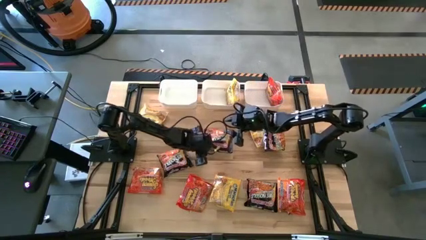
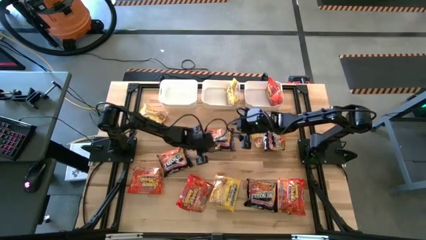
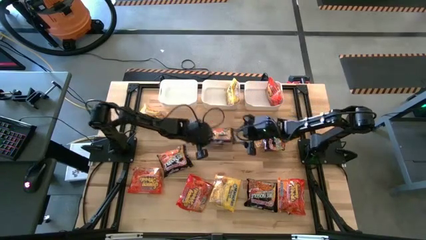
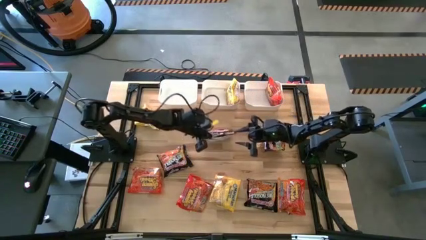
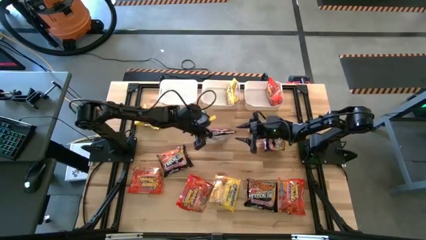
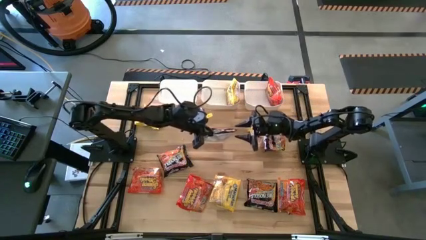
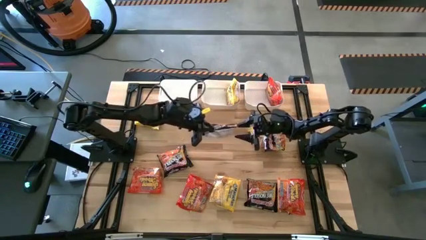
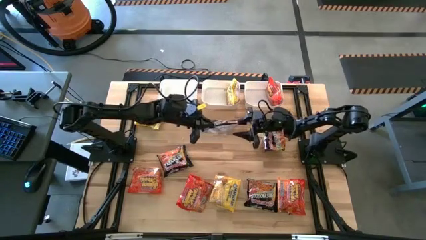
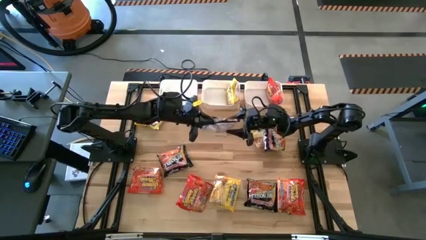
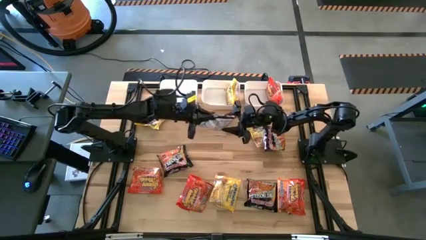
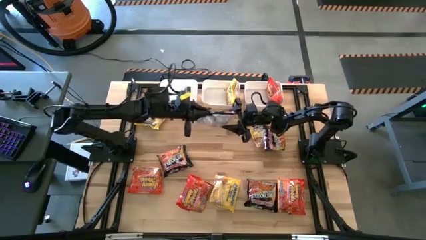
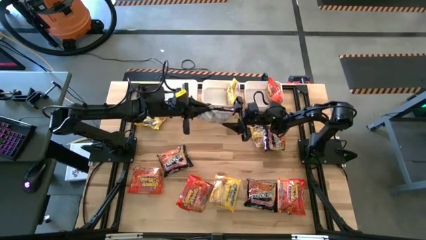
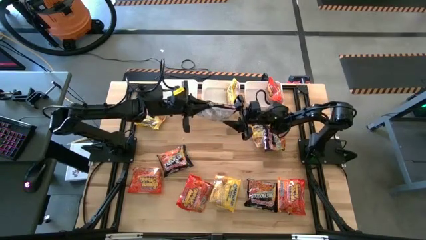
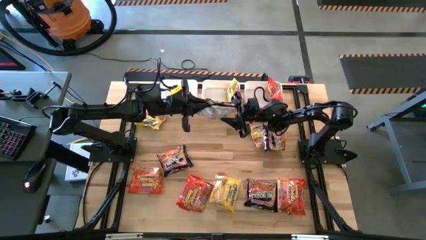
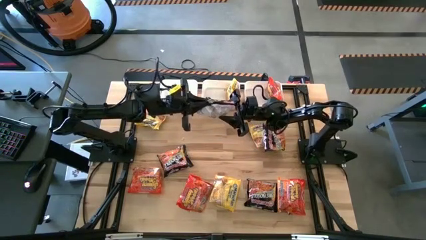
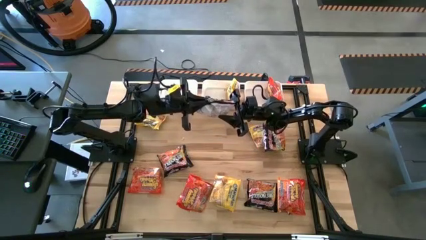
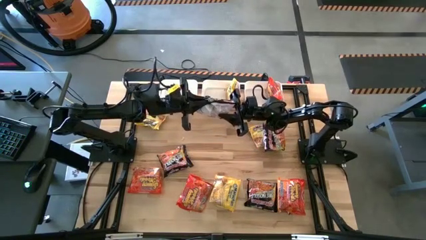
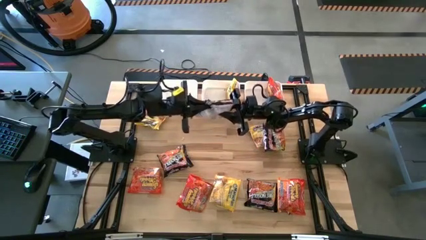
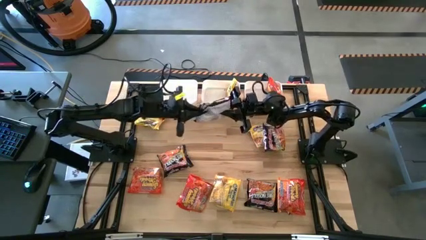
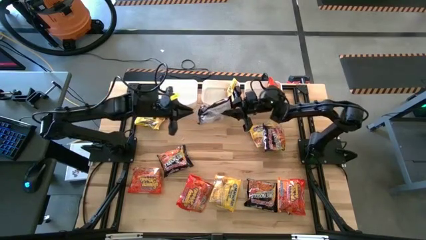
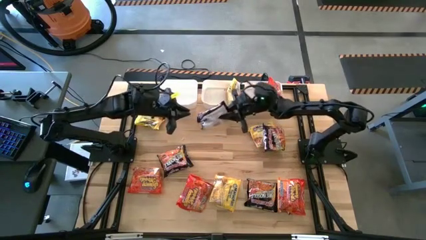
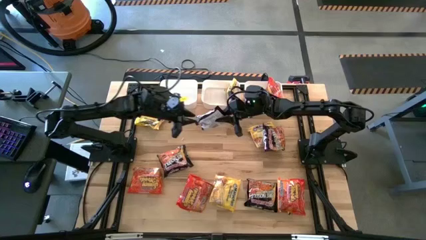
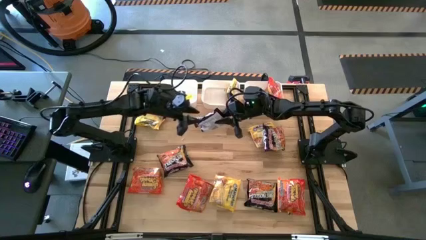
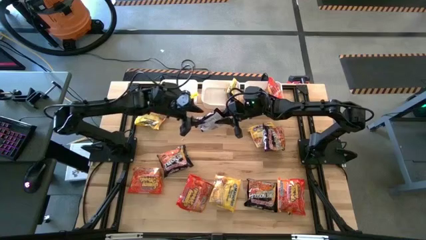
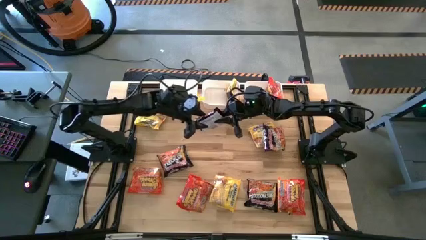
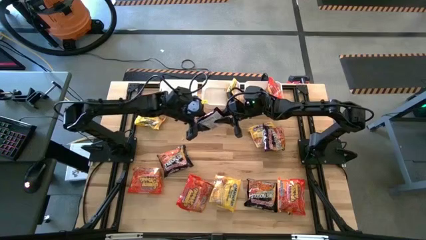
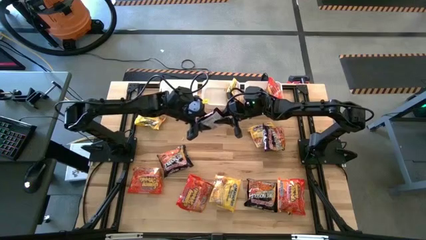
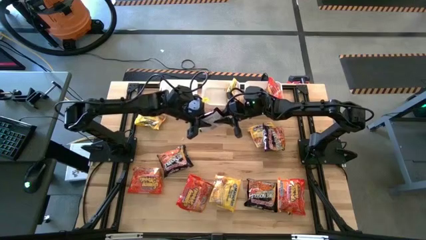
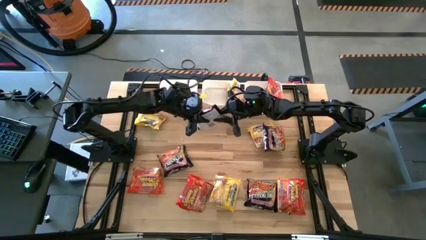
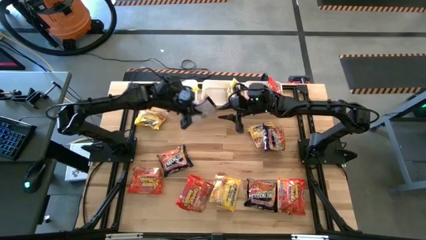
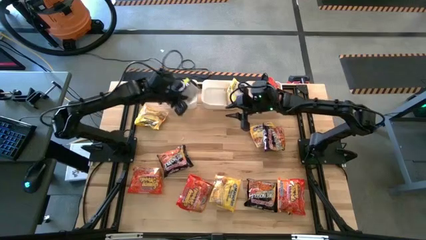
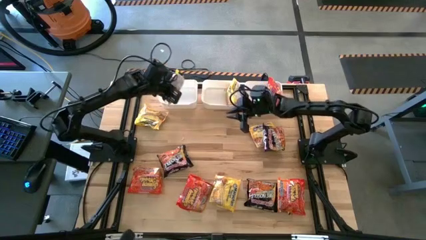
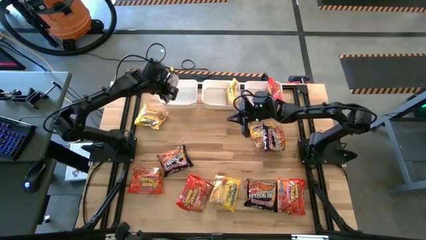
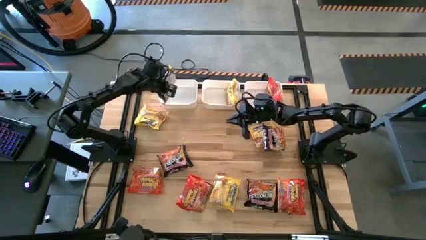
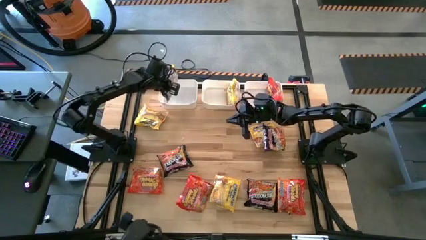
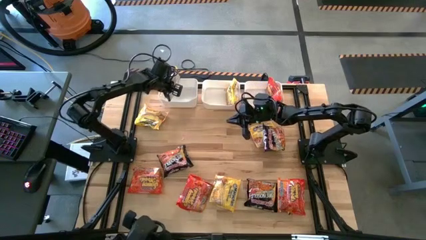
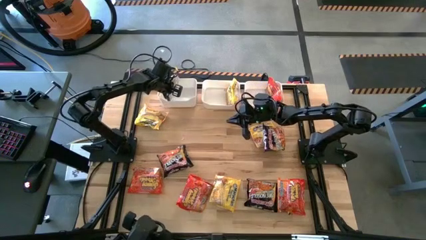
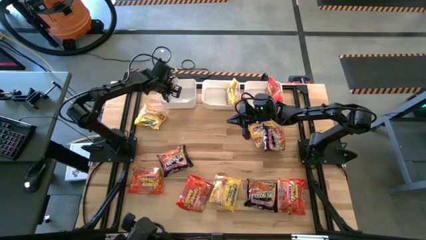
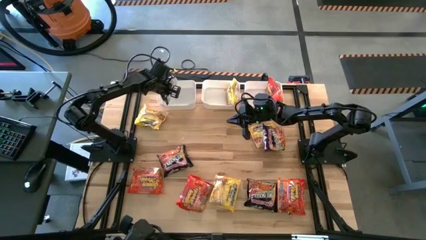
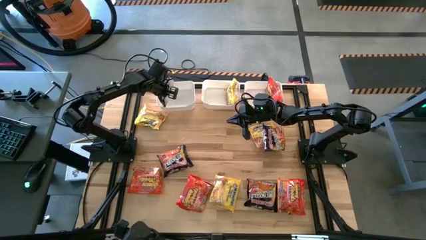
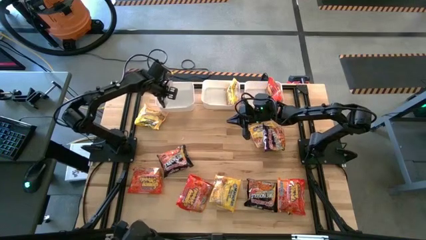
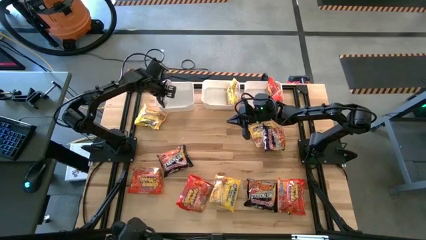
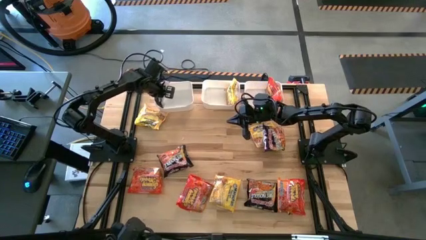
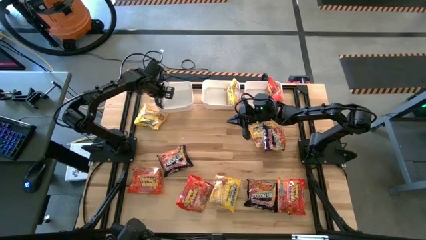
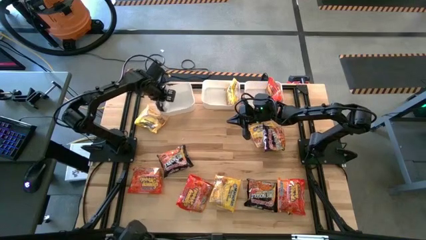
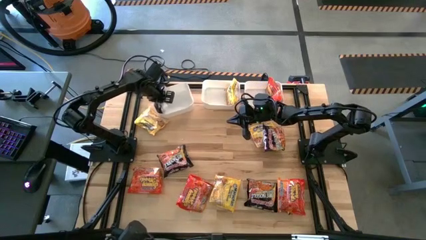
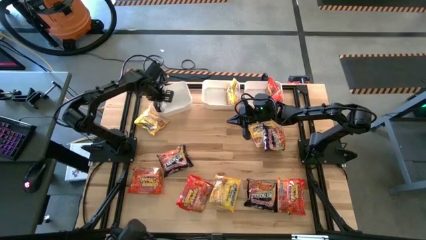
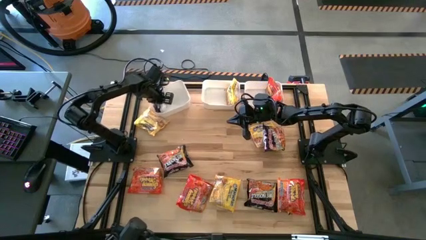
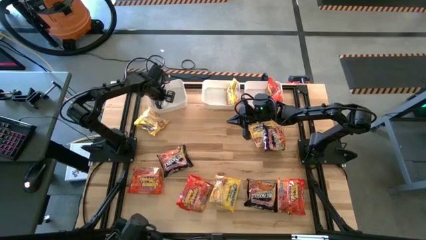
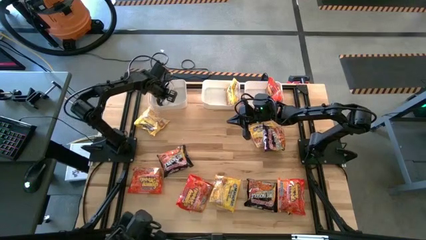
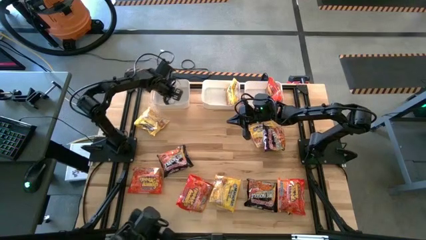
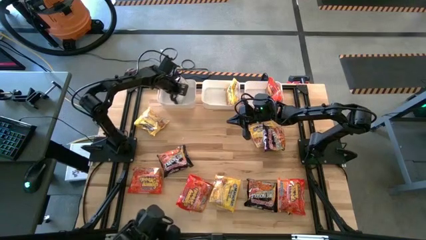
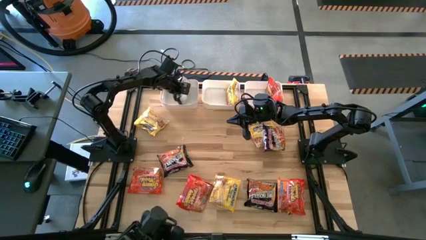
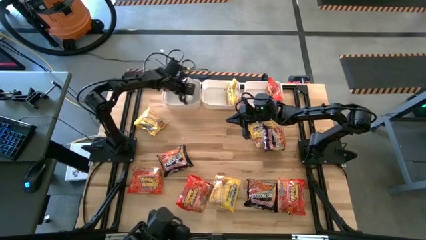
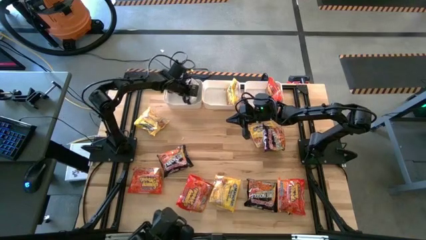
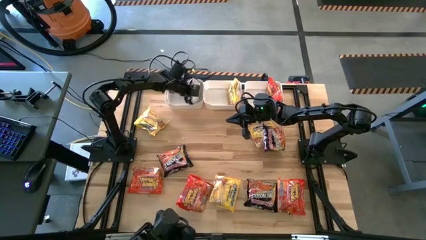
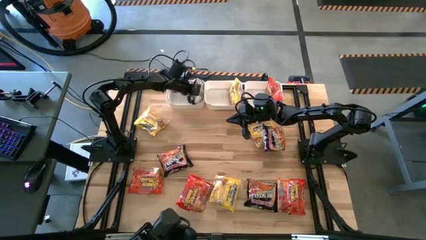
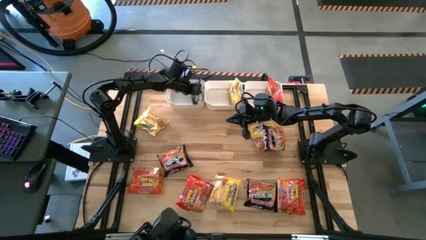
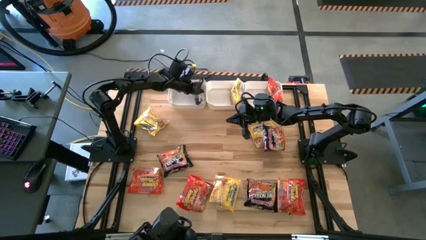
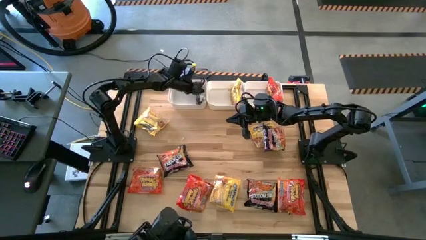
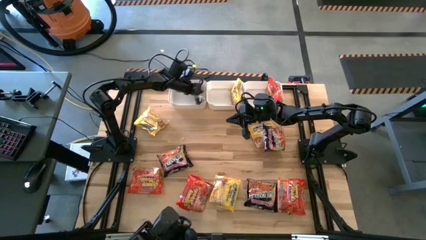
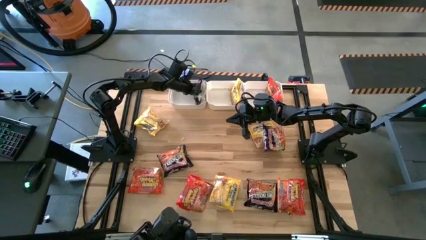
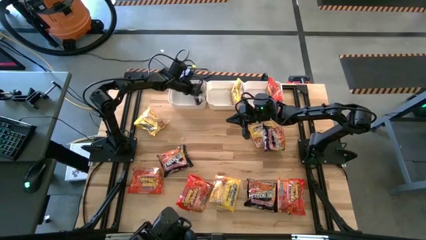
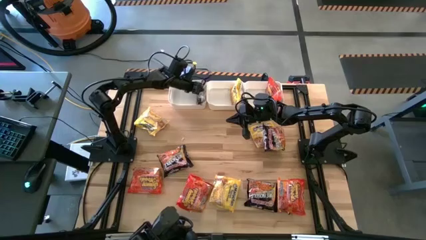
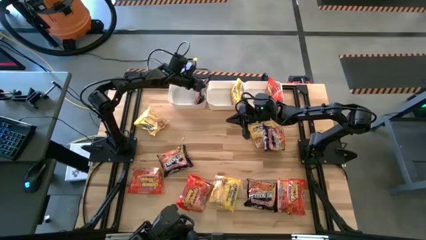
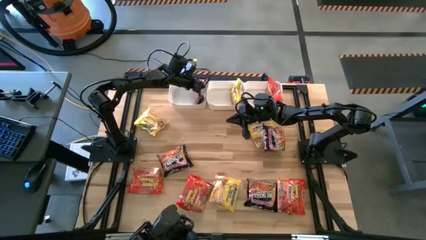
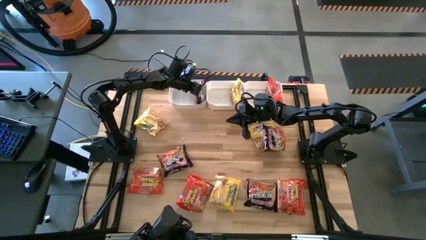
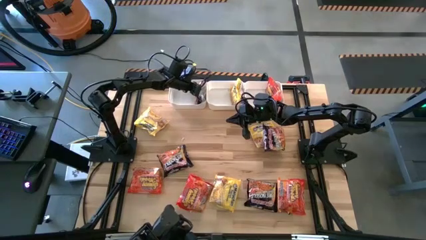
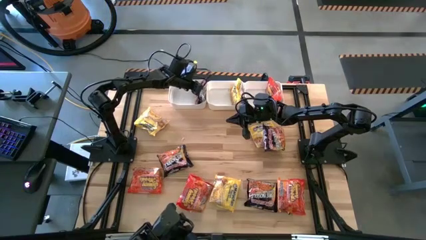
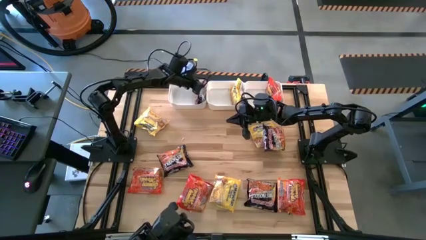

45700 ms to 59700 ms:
Task: Sort Maruchan noodles
Put the black noodle into the left white bin

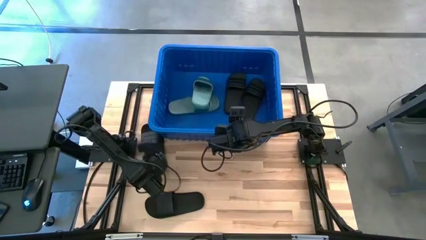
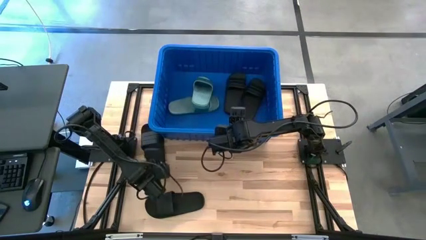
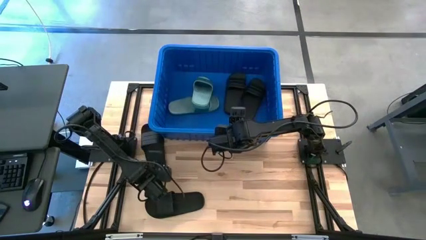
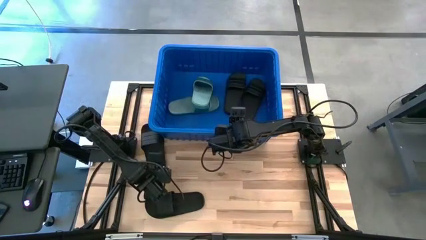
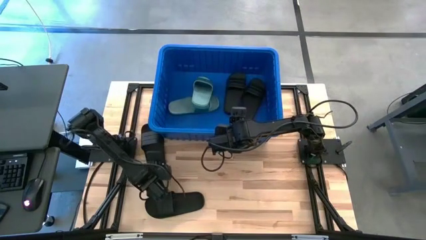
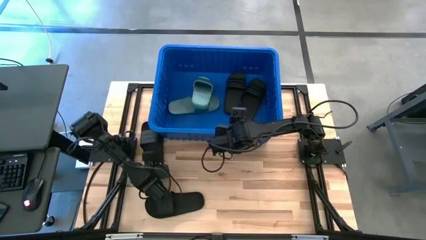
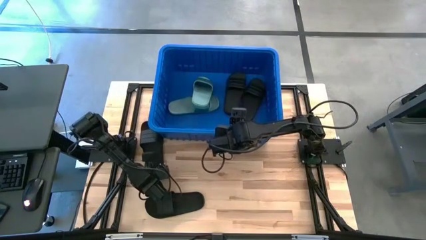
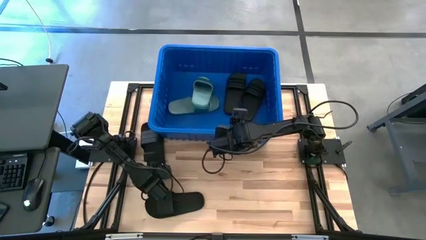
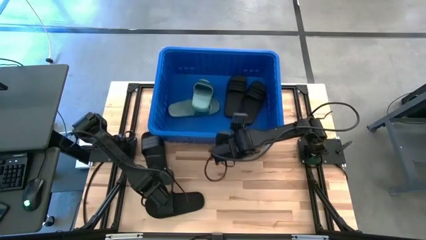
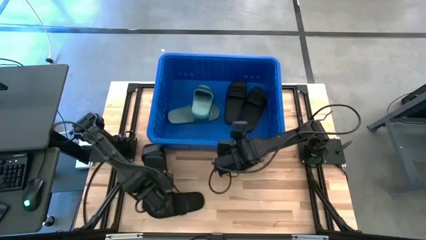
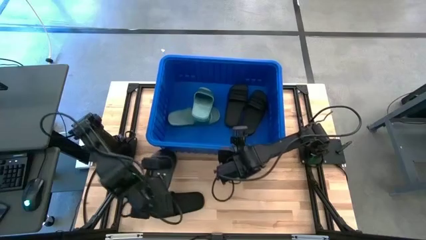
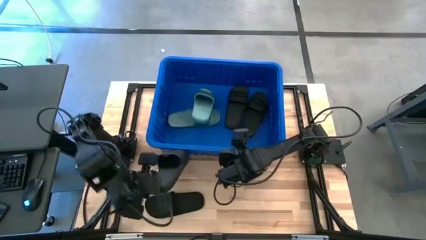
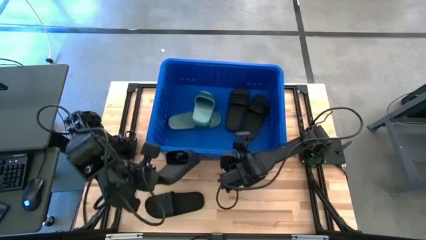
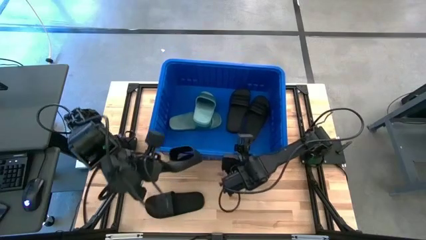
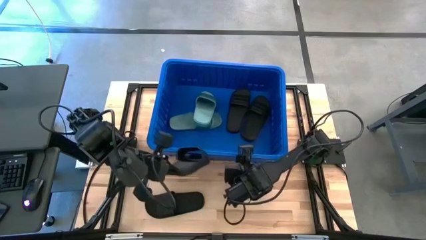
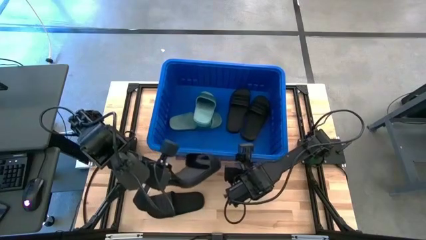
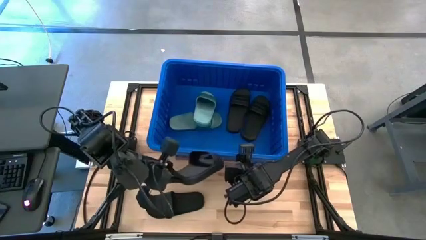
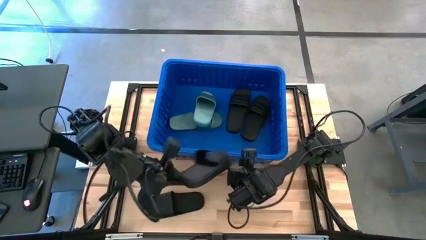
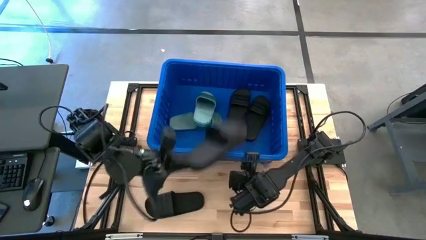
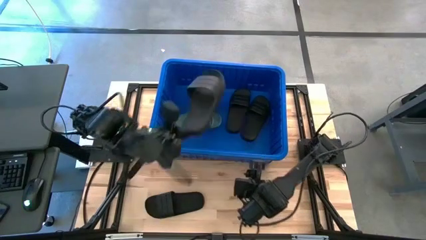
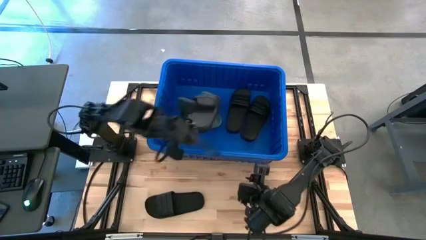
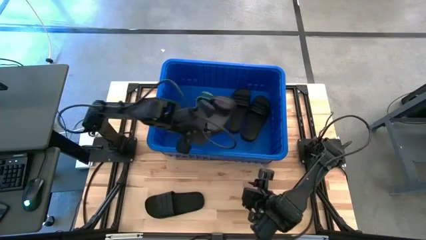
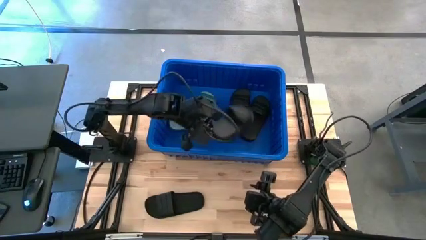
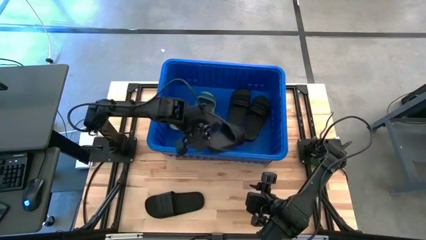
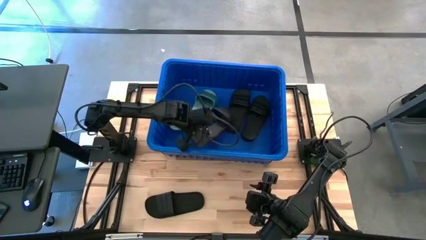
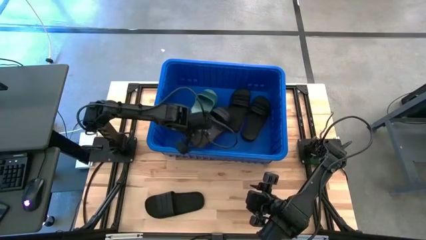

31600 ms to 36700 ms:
Task: Pick and place slides into bin
Put the black slipper into the blue bin
